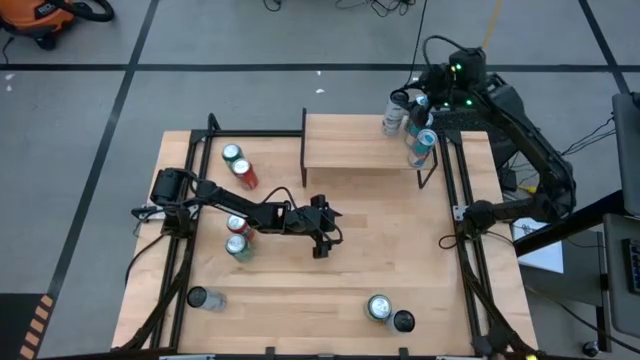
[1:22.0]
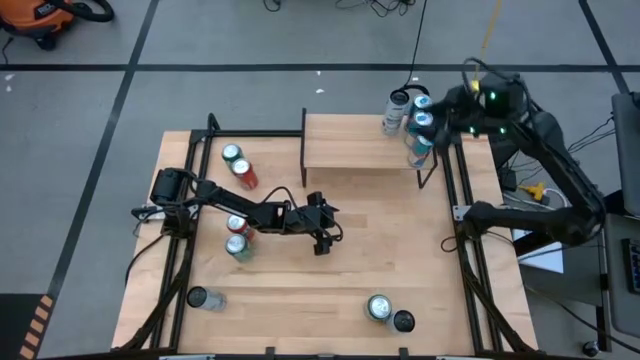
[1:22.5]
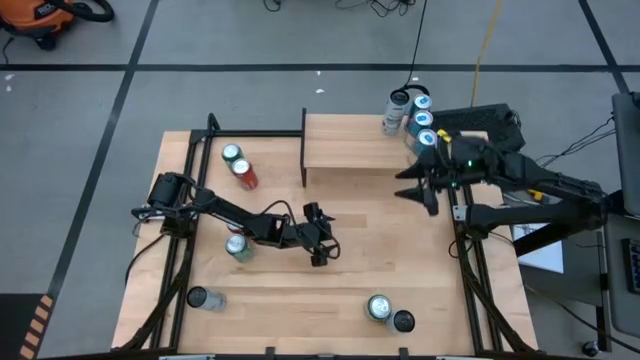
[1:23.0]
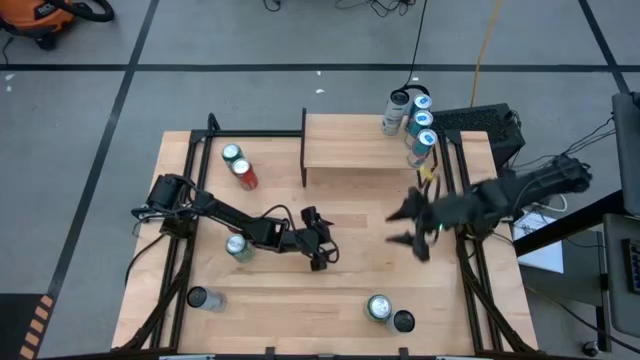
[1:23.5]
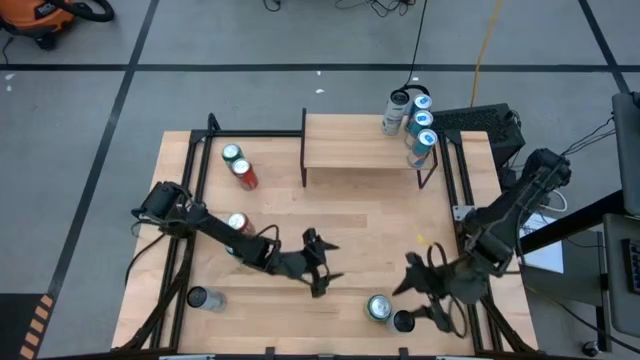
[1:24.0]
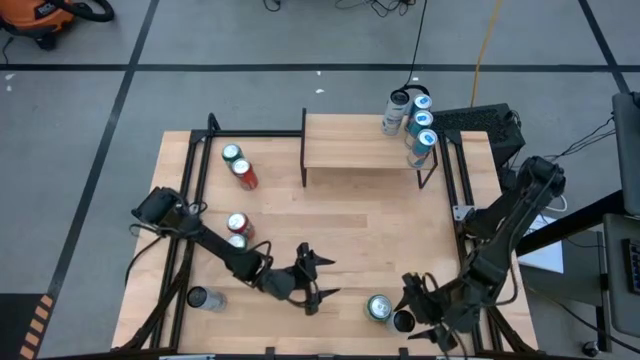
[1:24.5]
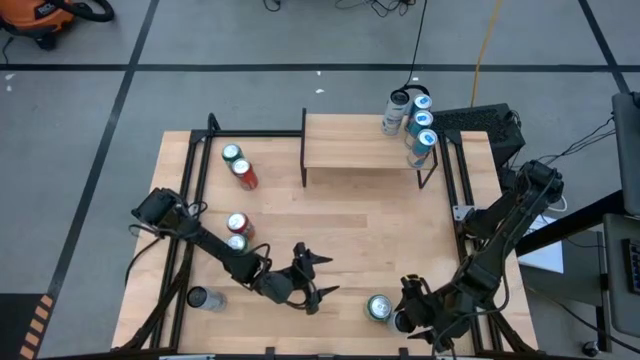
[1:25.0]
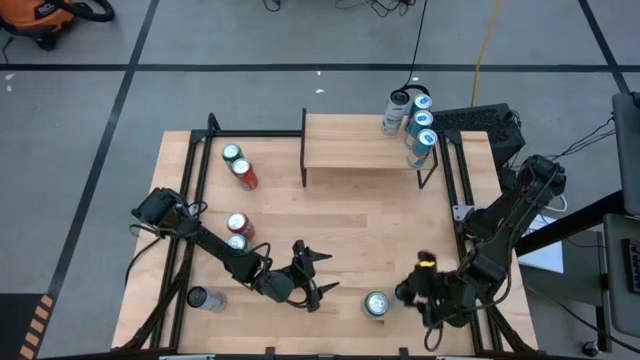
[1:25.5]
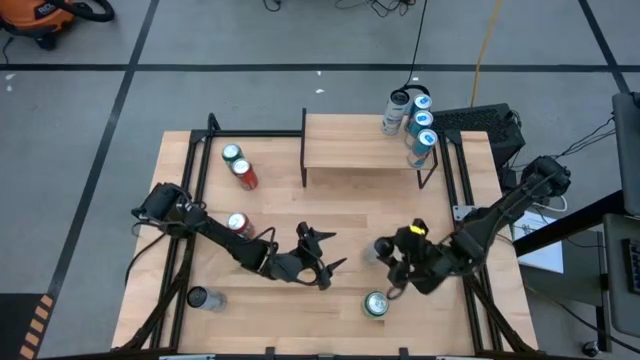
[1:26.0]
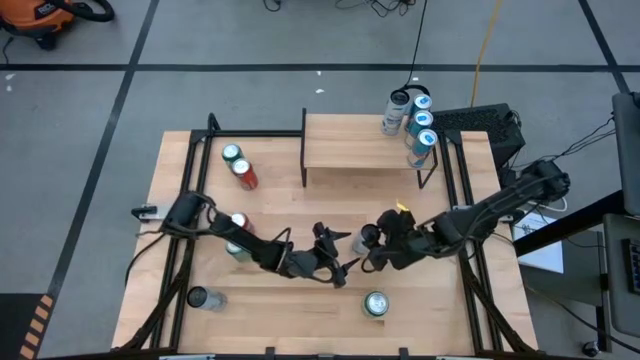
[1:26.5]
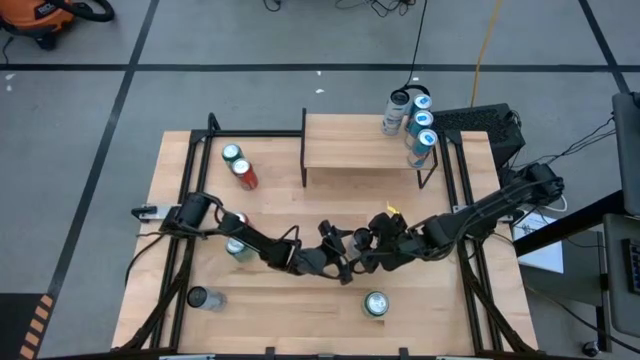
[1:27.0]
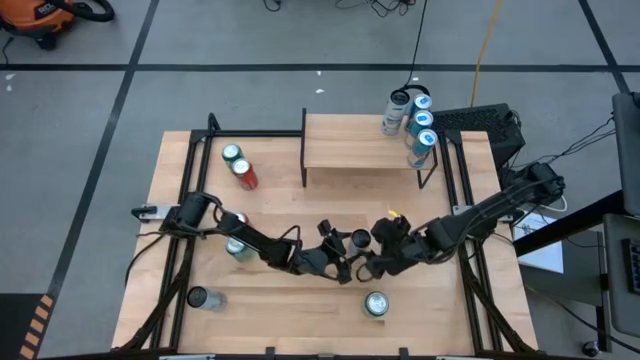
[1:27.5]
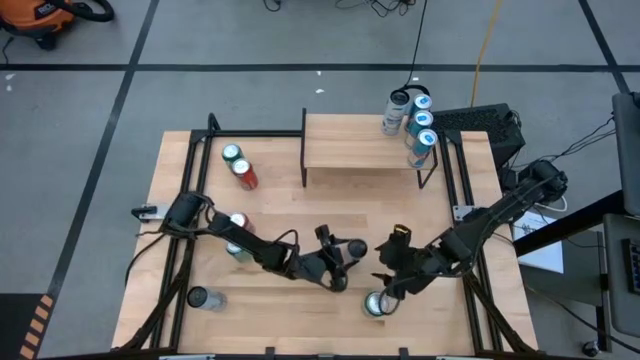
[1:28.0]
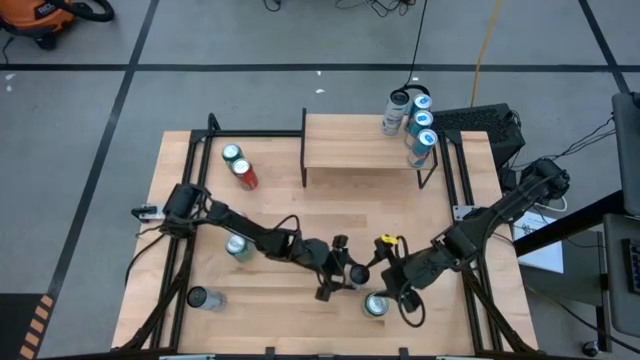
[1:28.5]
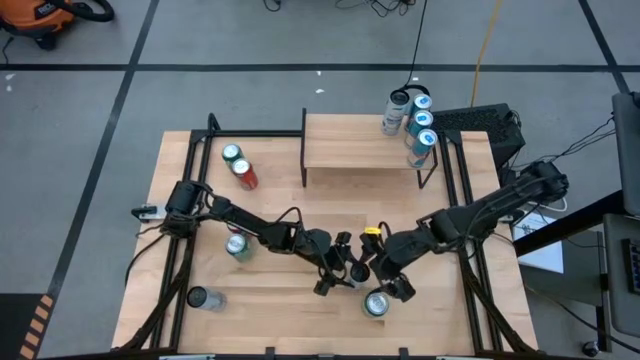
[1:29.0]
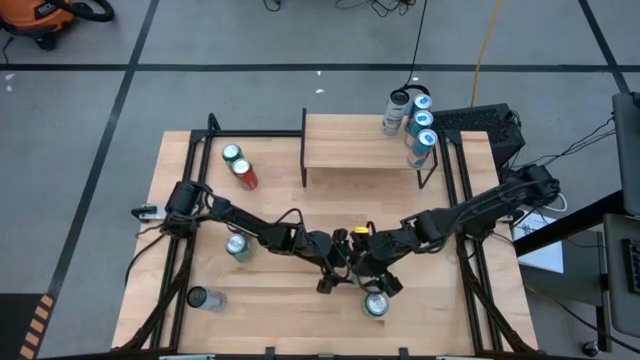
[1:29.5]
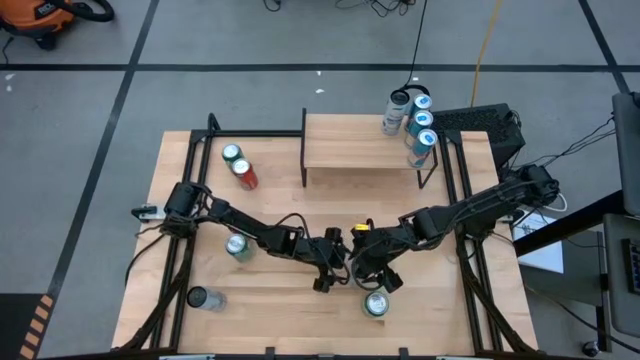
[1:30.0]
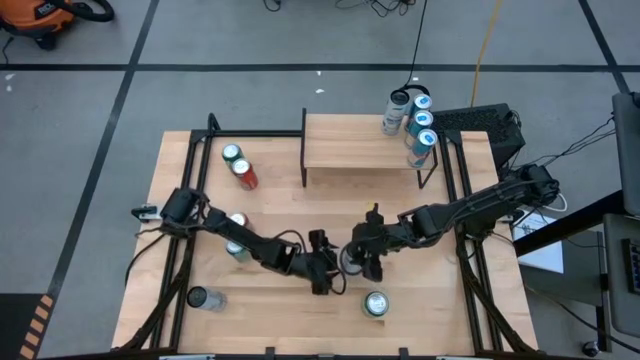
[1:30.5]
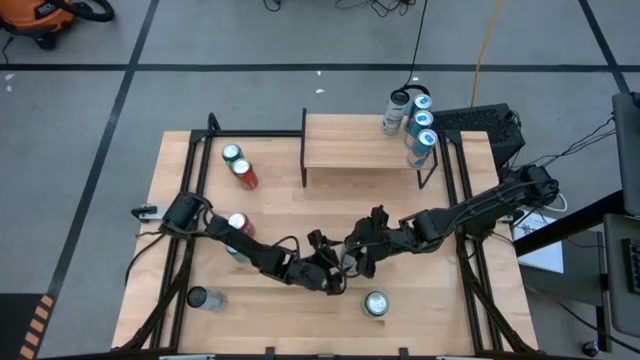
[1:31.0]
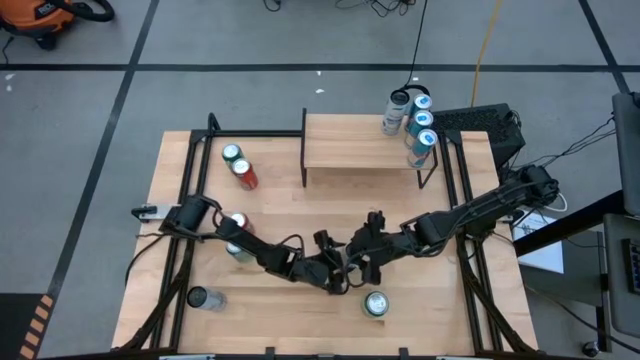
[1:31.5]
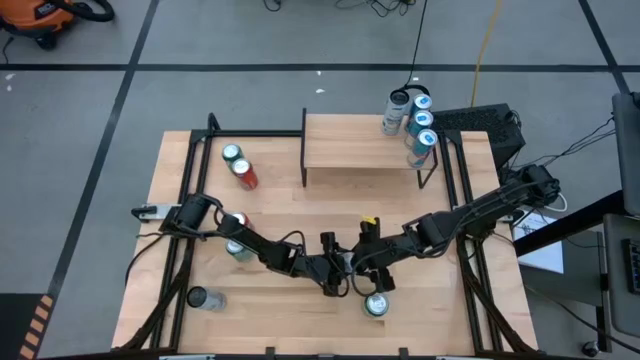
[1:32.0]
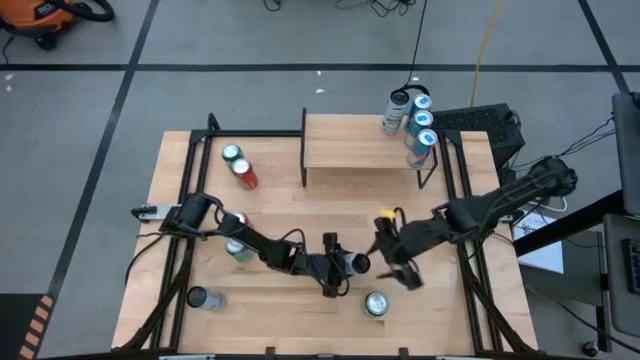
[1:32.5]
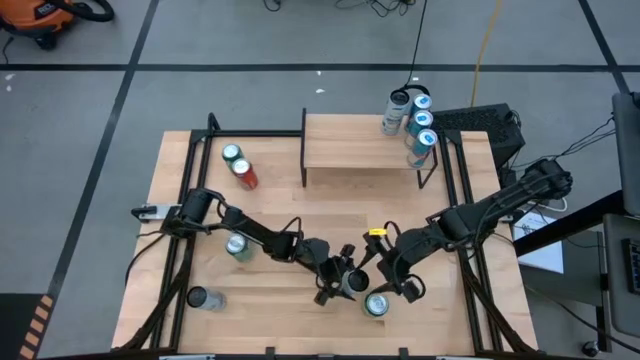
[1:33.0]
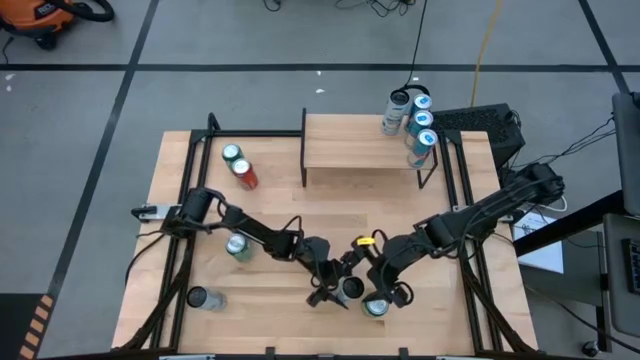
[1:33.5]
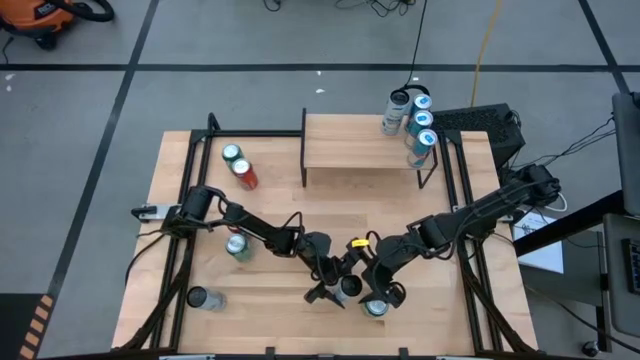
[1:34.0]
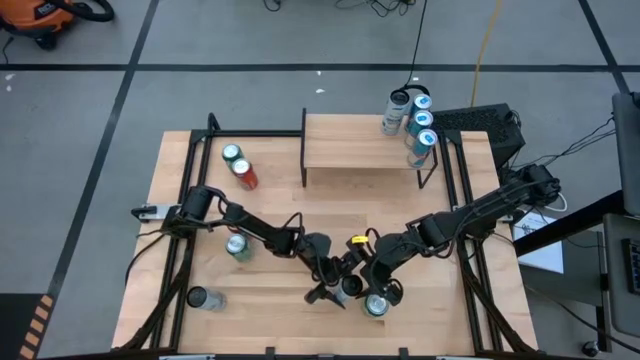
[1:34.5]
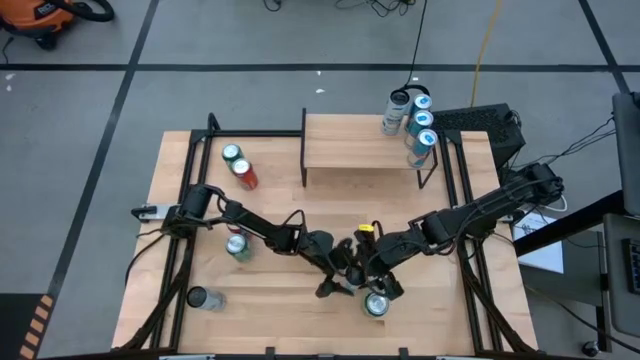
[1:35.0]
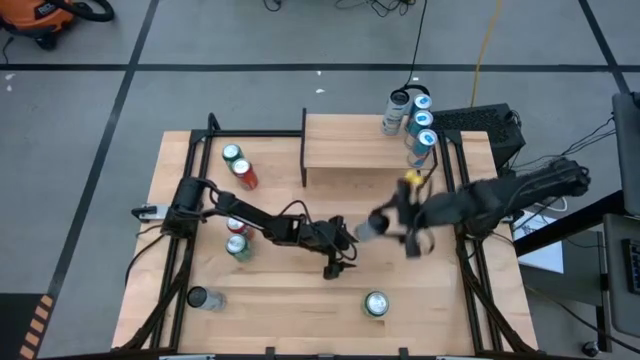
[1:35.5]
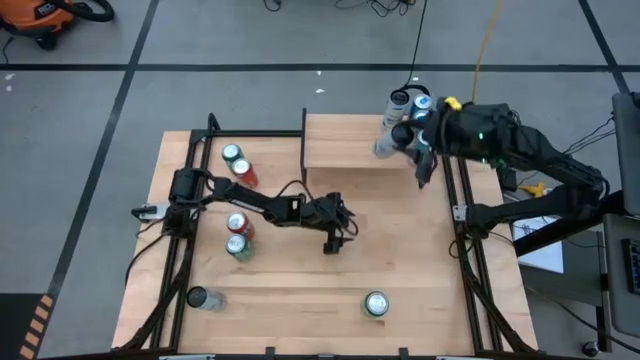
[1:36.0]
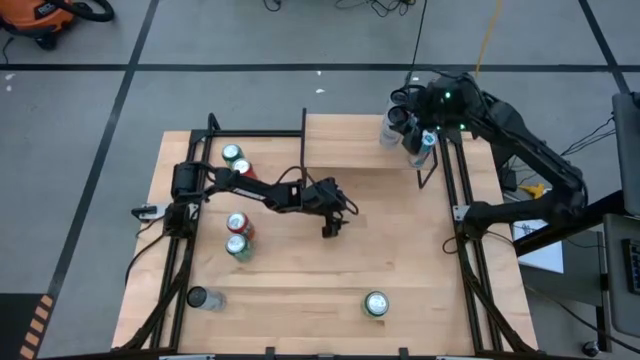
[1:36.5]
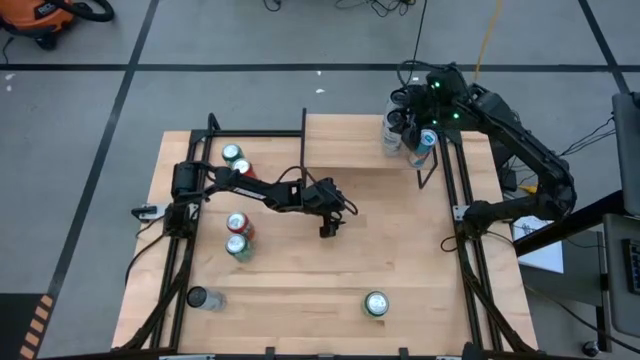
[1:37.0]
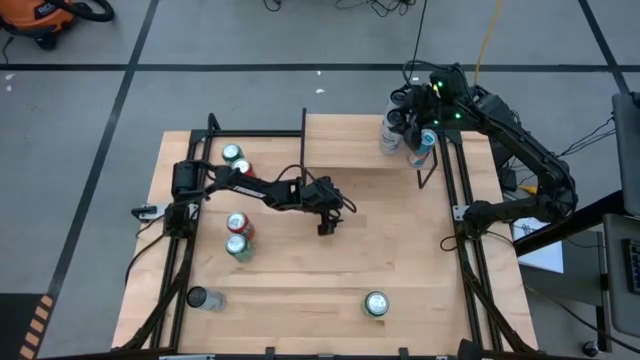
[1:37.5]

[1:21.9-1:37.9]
Task: Place canned beverage on shelf
Put the right white blue soda can on the shelf aligned with the other white blue soda can

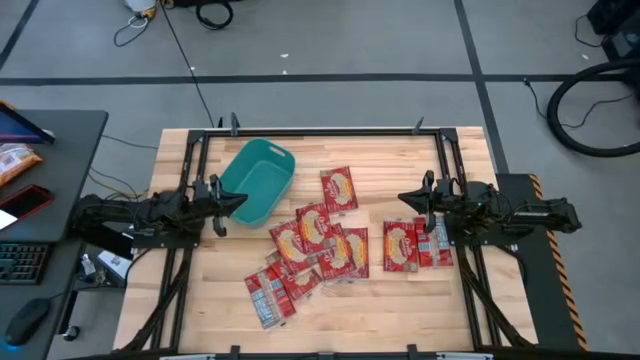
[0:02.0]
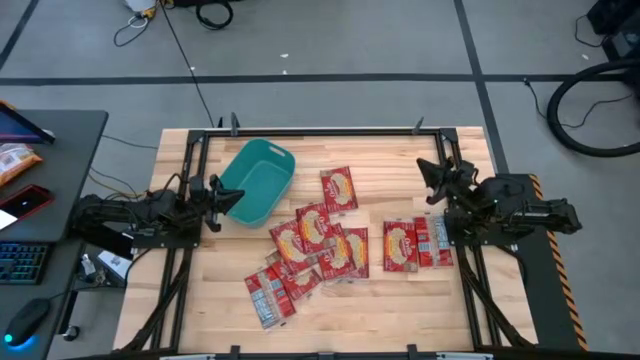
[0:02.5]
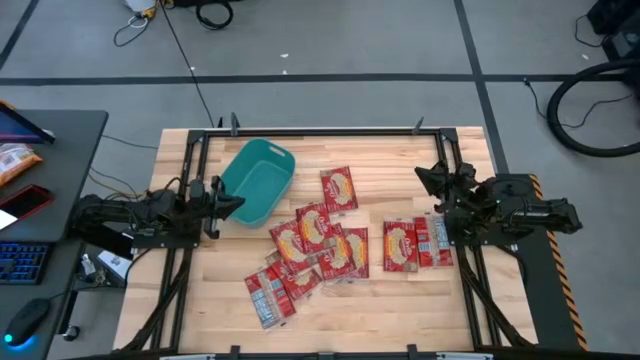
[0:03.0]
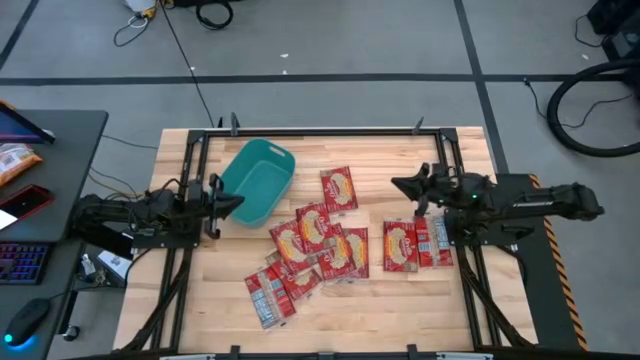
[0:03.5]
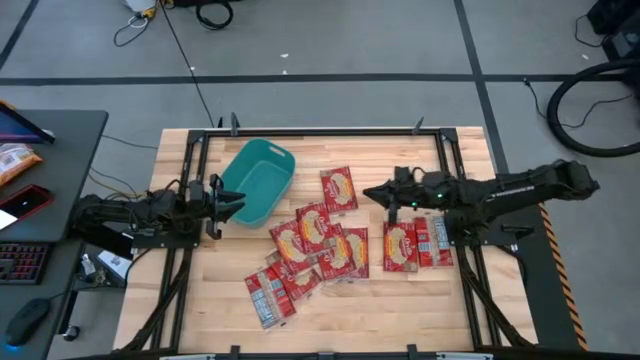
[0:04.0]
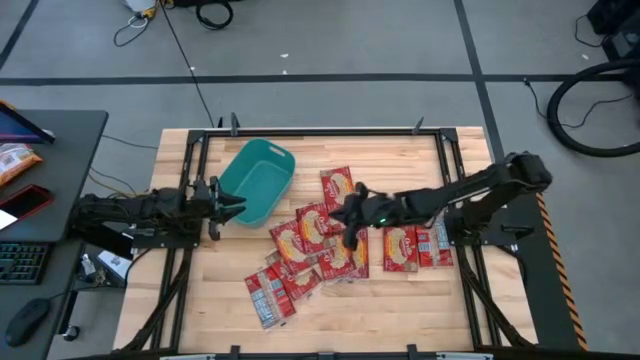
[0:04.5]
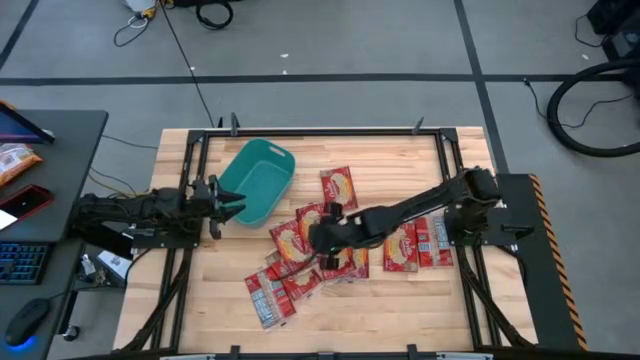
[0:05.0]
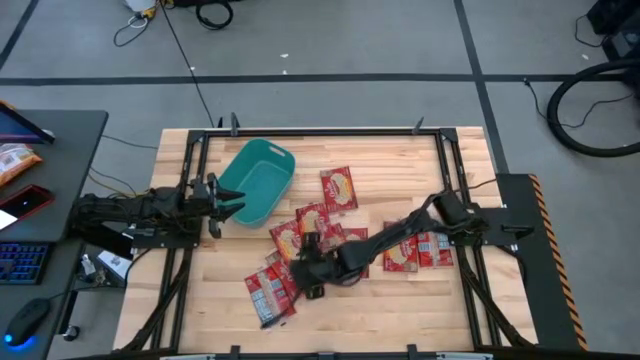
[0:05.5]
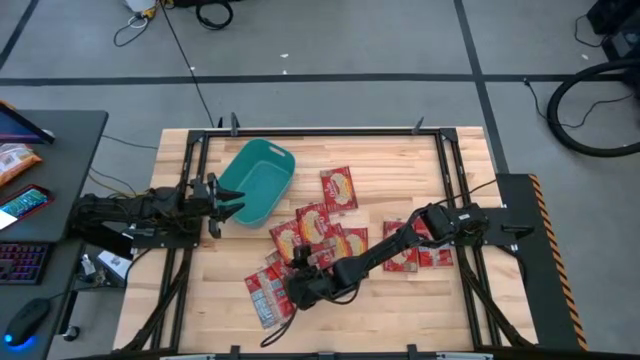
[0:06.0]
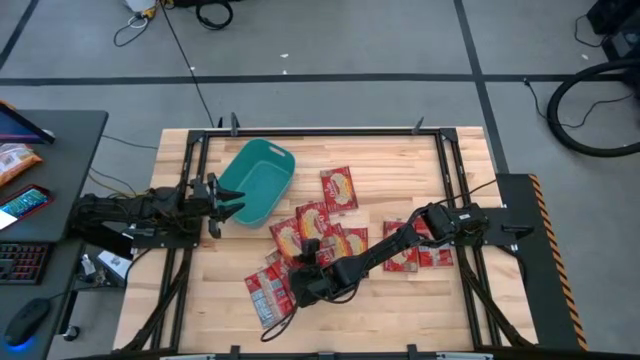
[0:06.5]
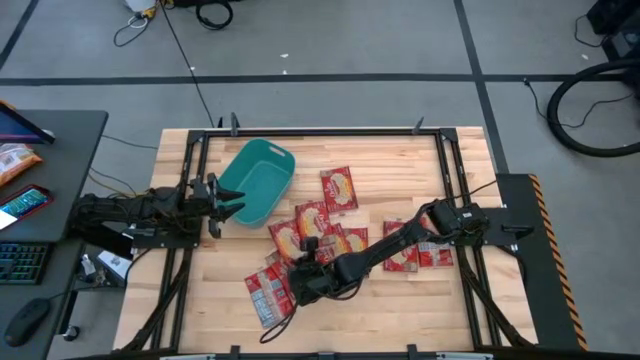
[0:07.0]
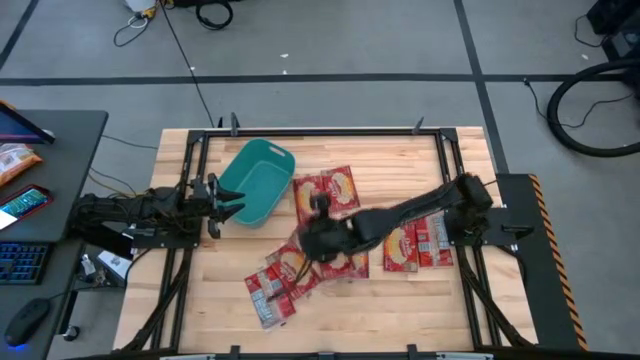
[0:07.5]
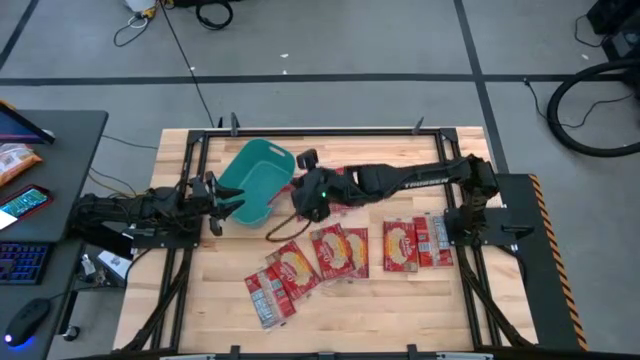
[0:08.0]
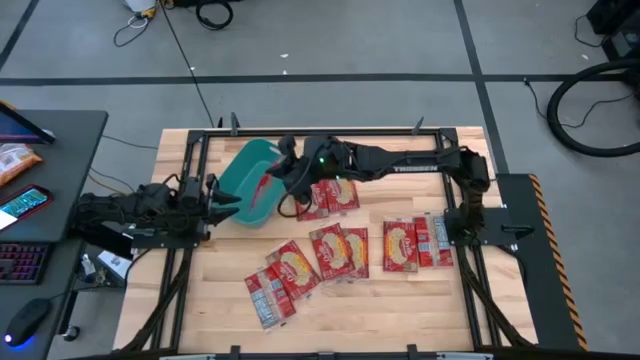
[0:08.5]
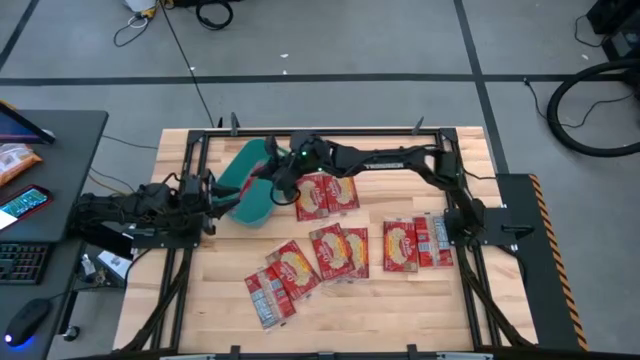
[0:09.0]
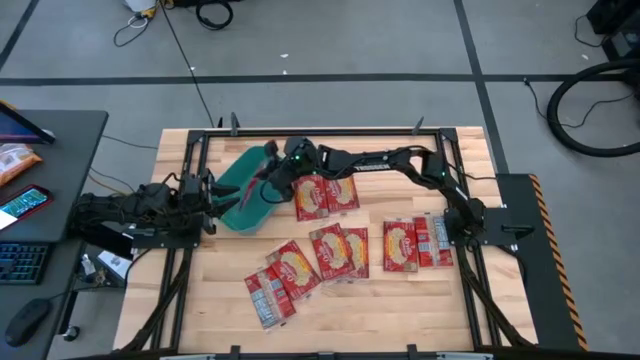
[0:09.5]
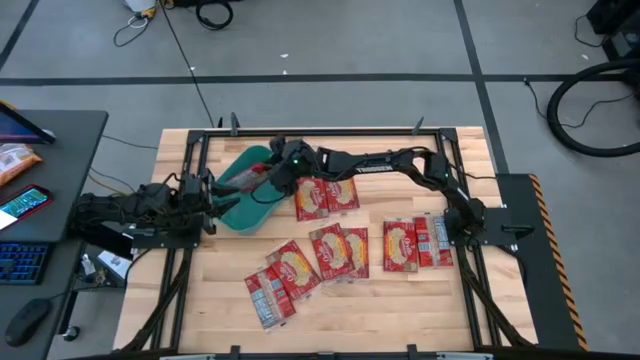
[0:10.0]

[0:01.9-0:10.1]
Task: Sort popcorn bags into baskets
Put the red popcorn bag into the green bin
